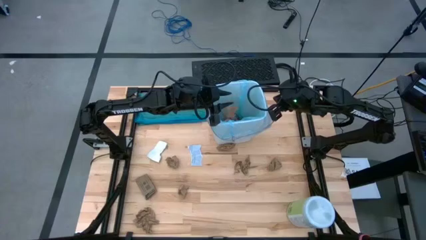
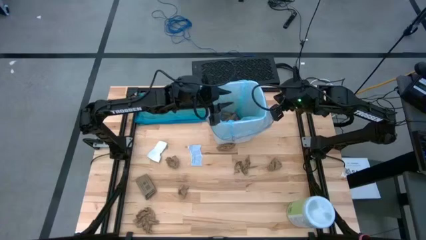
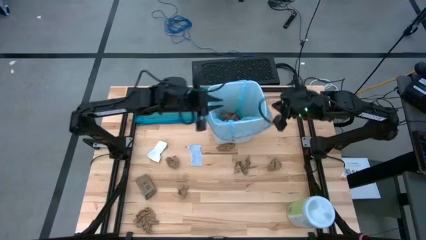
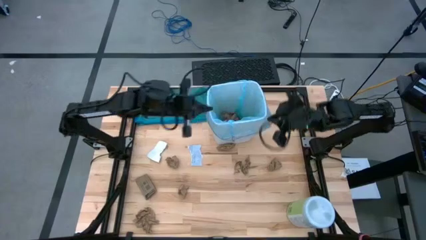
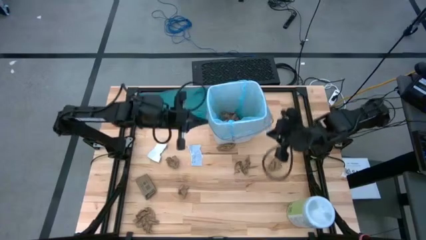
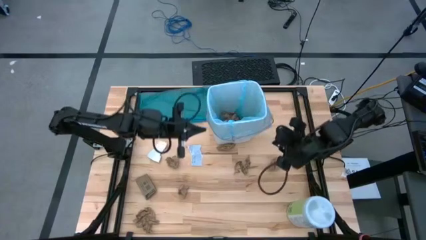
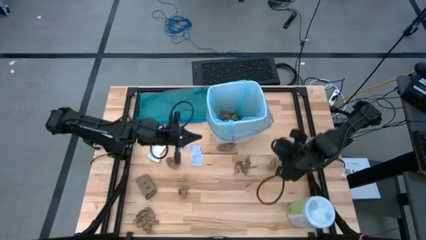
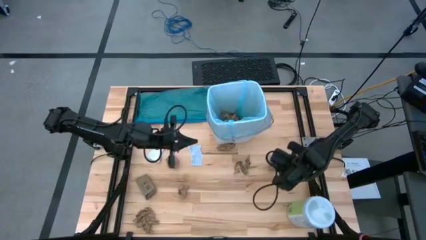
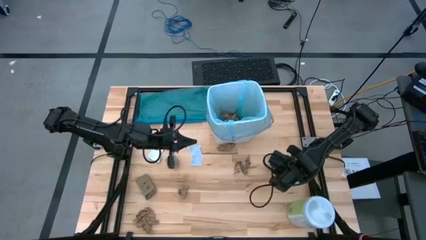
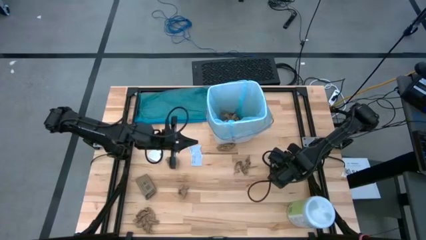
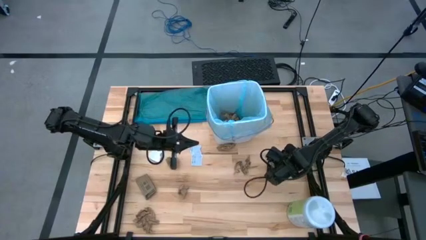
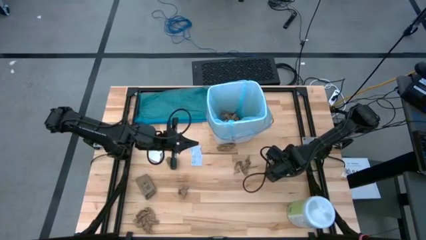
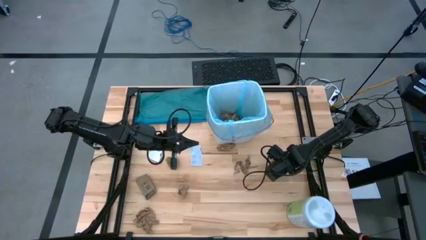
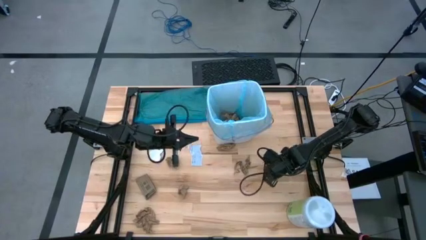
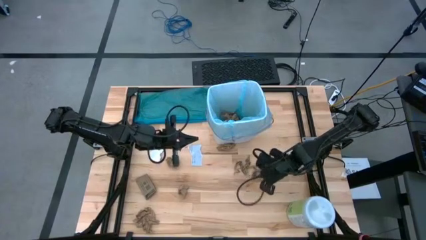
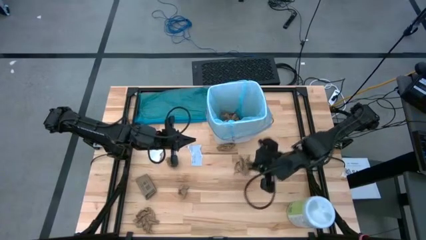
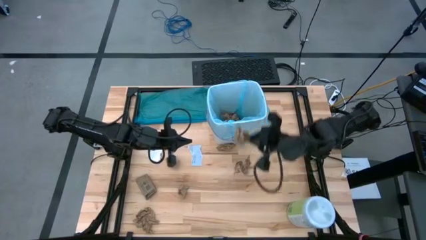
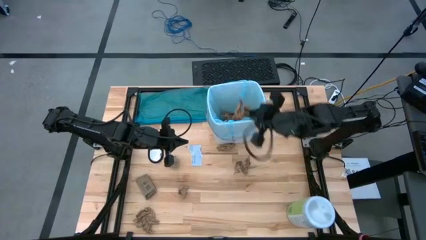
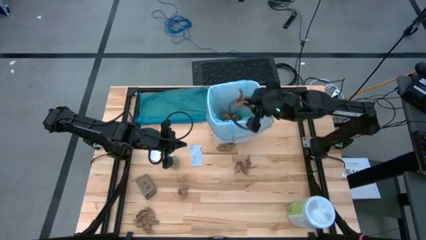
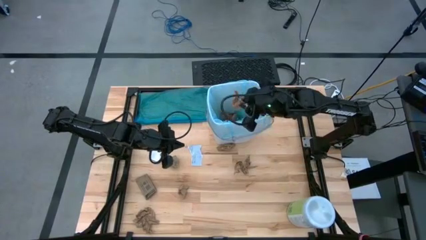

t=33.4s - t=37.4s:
Task: place trash/remove bag and relplace
Put the brown napkin into the blue trash bin

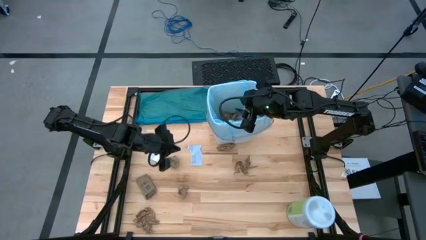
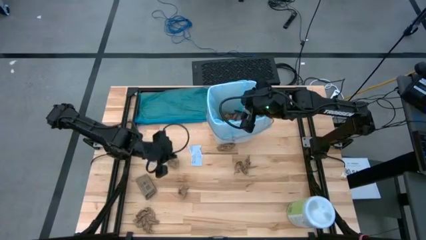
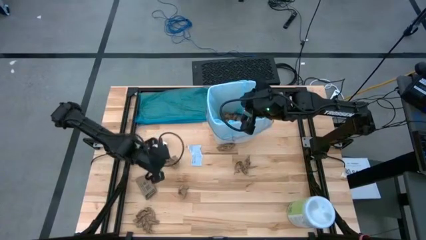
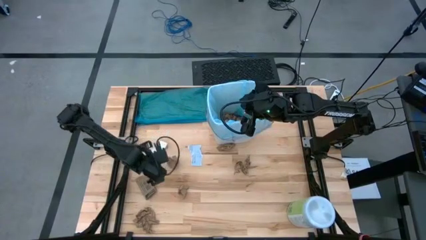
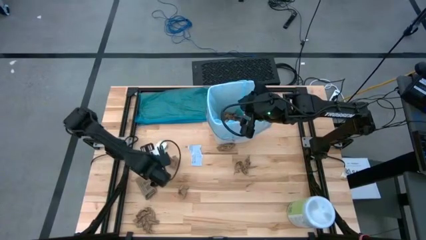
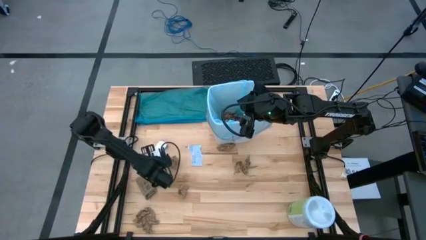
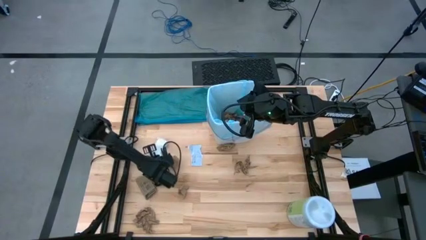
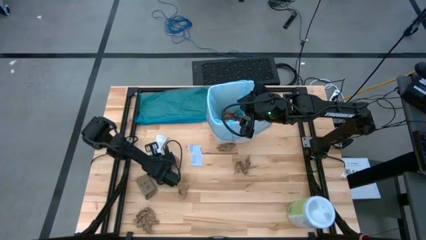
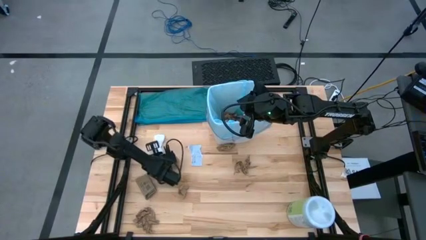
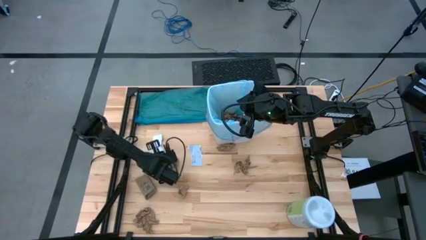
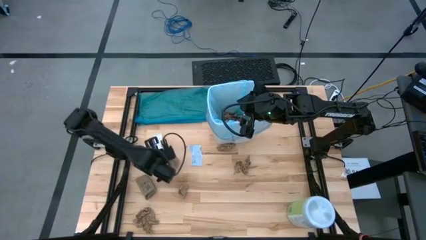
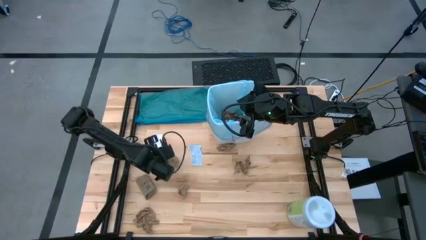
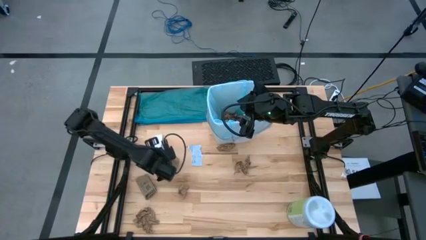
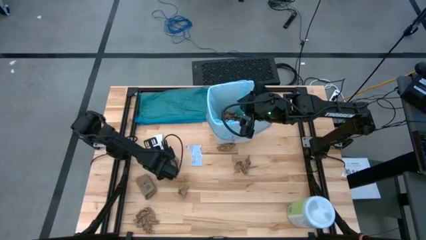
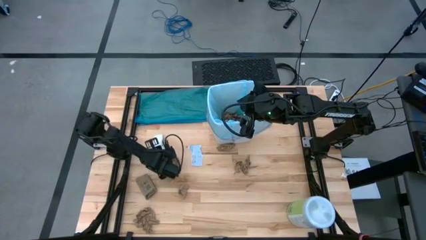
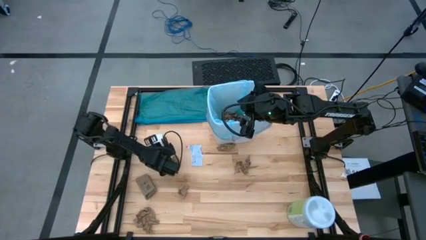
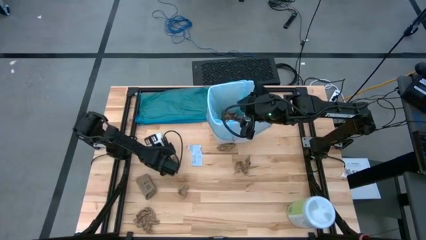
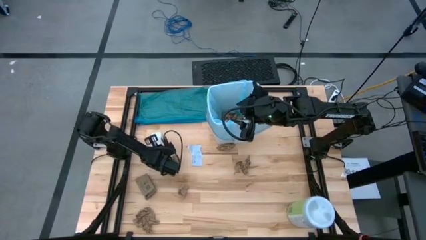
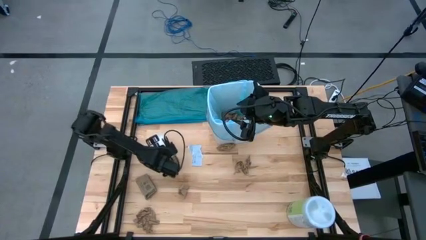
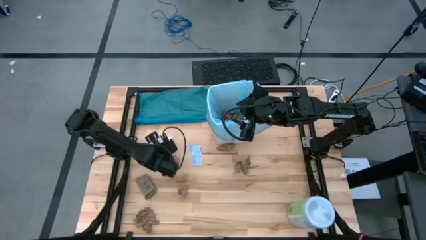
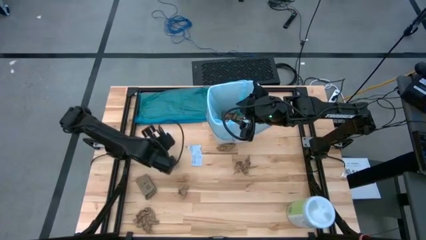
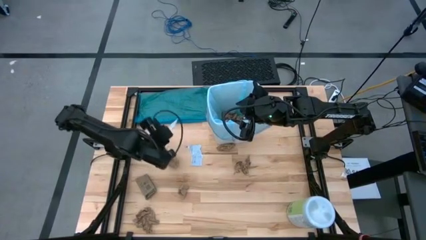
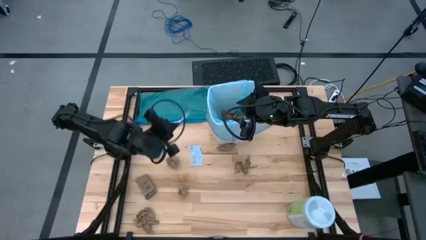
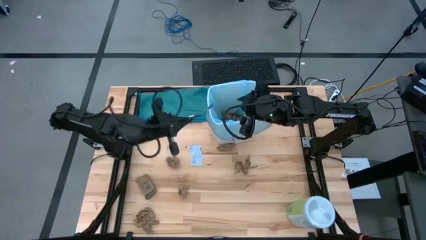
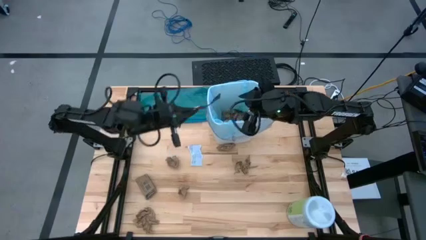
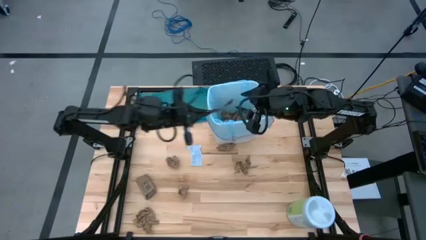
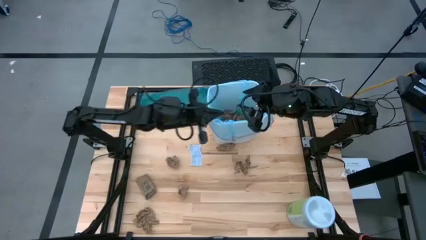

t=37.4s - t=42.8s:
Put the white paper into the blue trash bin

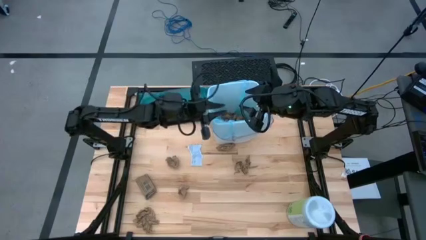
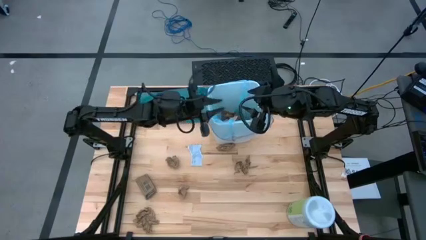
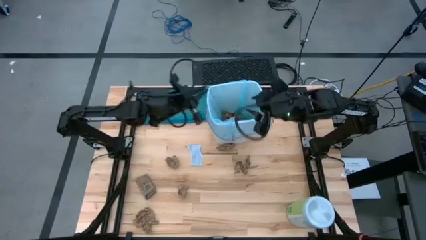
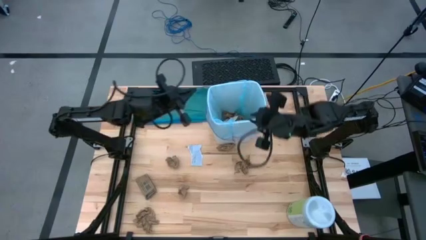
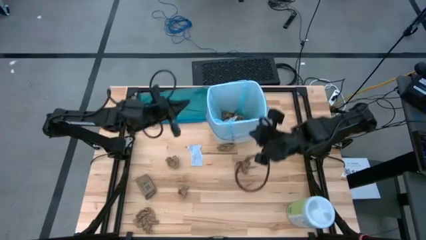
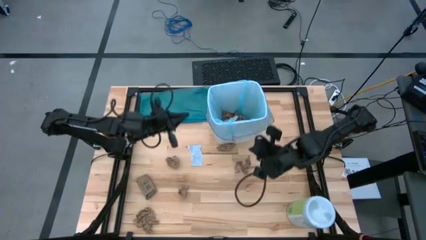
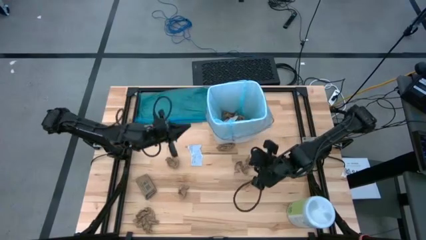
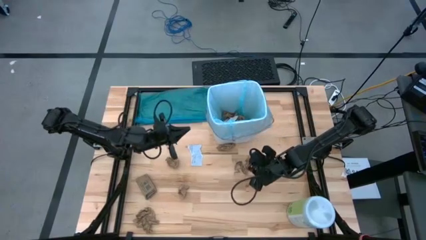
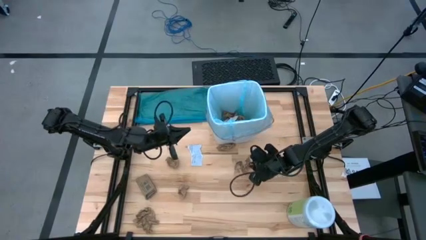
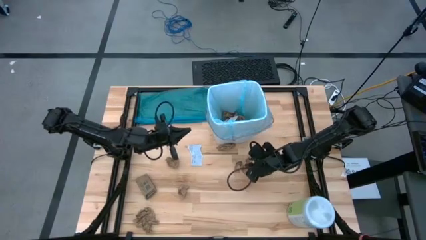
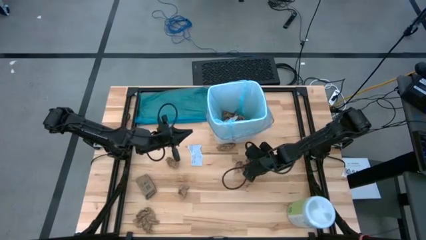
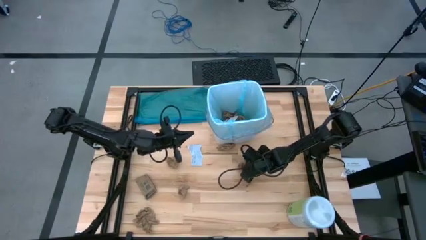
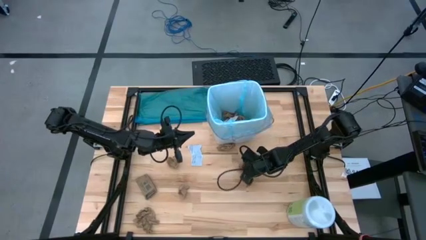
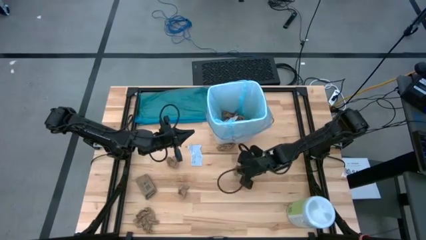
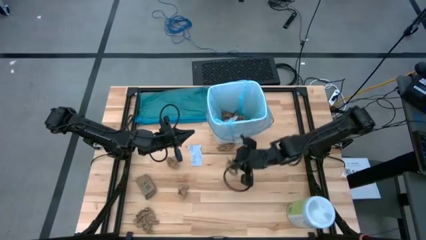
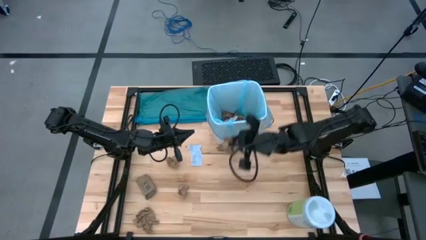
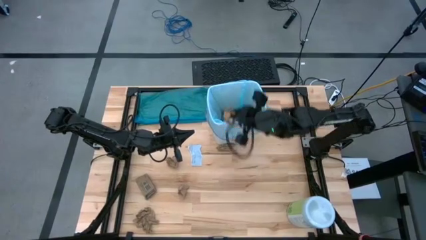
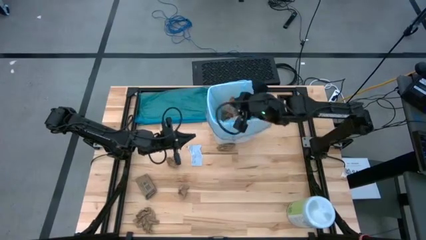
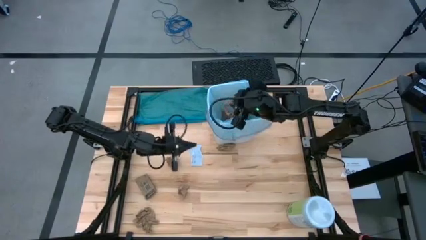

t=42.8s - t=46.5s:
Put the brown napkin into the blue trash bin

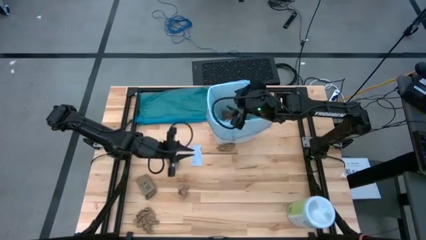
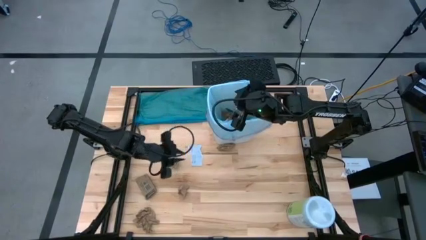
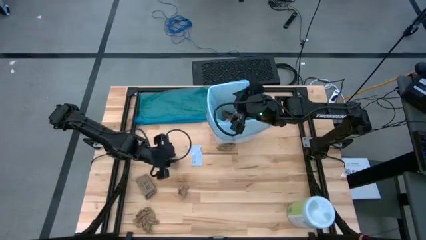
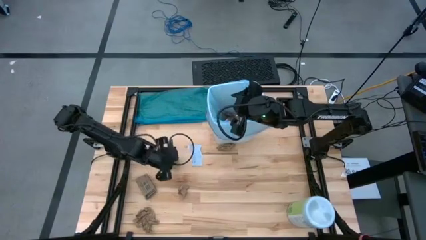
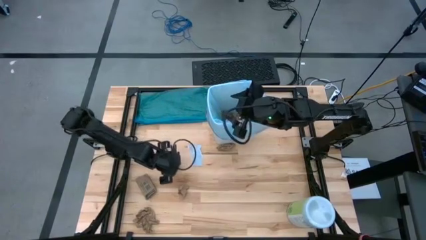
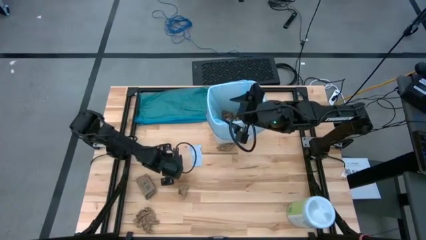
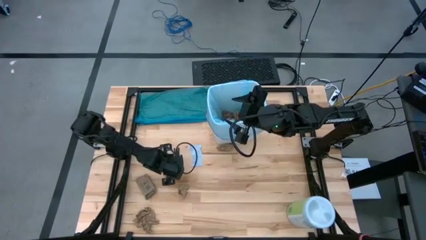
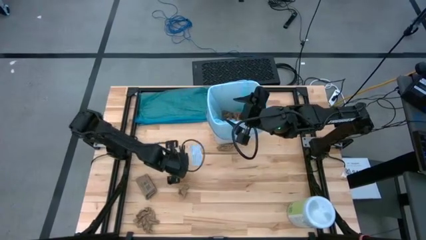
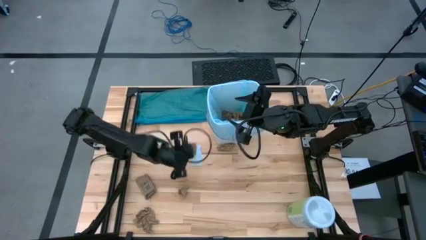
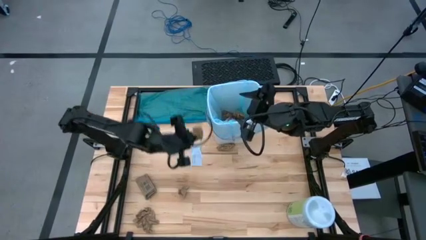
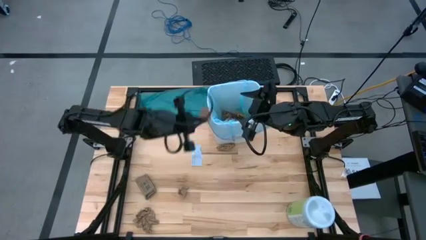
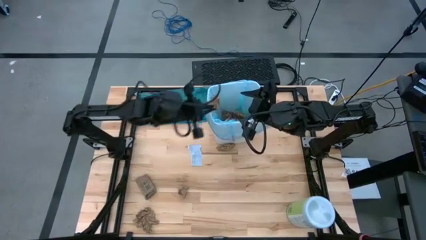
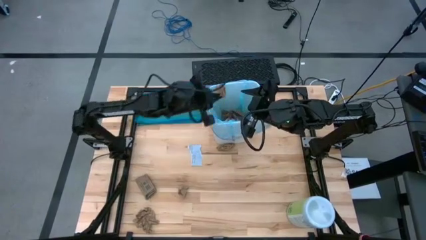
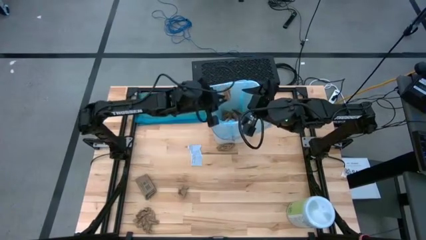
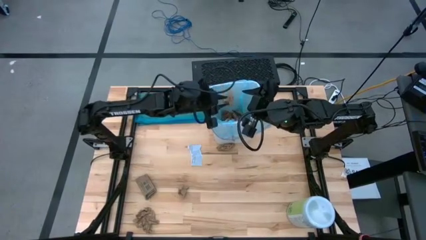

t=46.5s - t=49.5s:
Put the brown napkin into the blue trash bin
